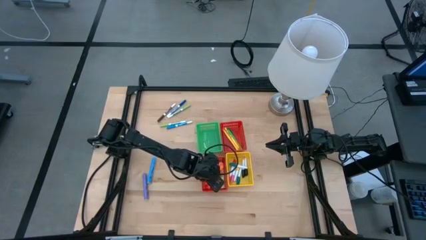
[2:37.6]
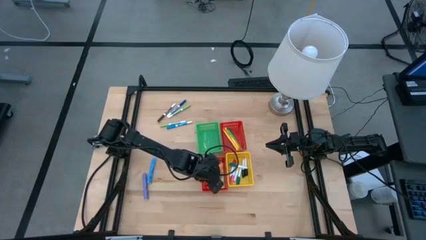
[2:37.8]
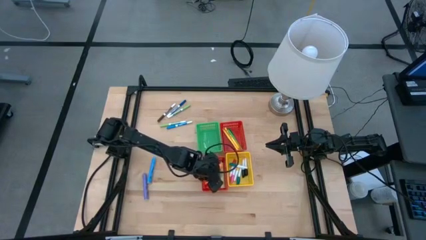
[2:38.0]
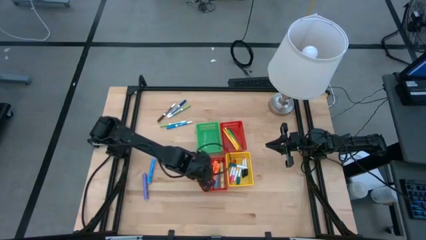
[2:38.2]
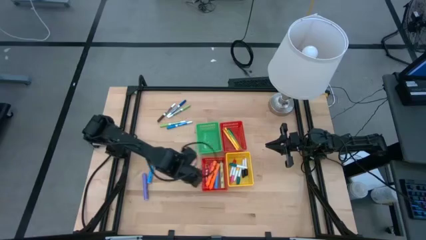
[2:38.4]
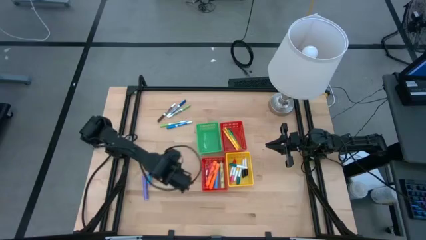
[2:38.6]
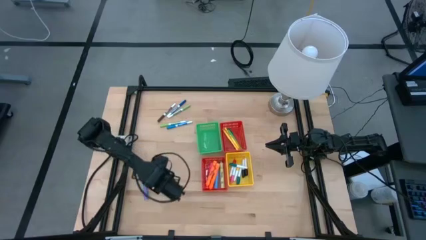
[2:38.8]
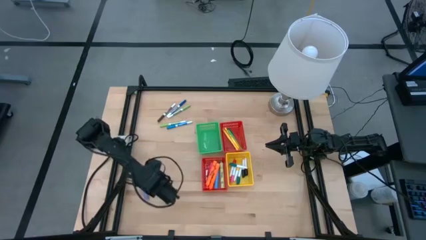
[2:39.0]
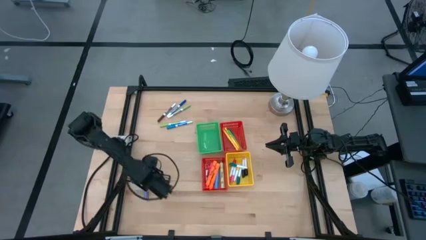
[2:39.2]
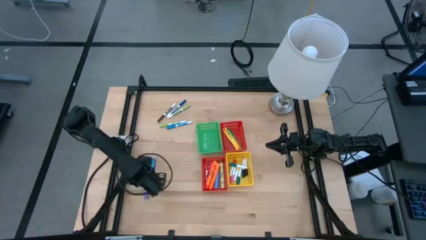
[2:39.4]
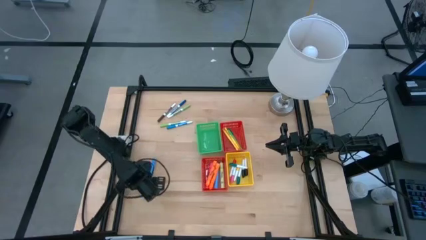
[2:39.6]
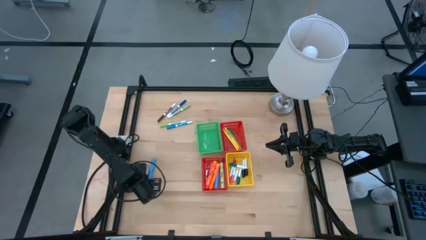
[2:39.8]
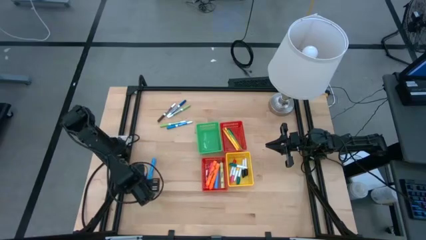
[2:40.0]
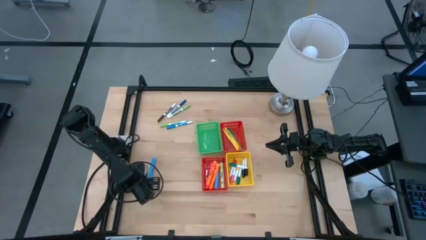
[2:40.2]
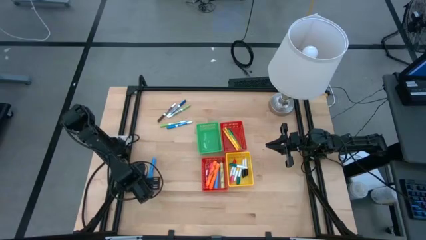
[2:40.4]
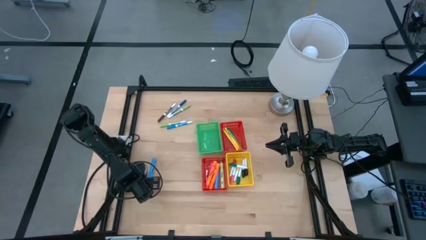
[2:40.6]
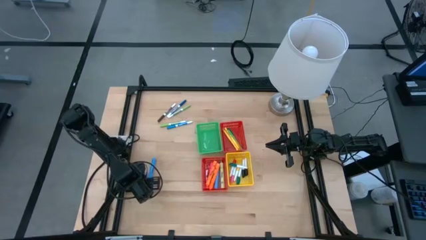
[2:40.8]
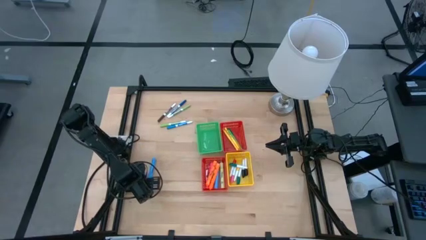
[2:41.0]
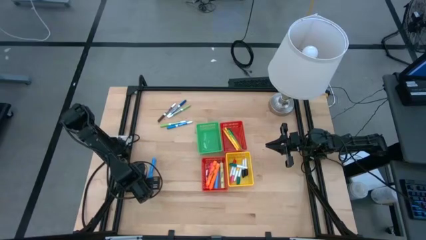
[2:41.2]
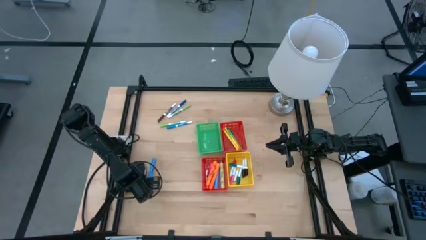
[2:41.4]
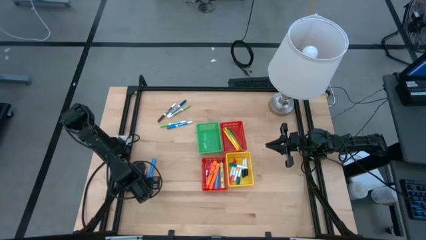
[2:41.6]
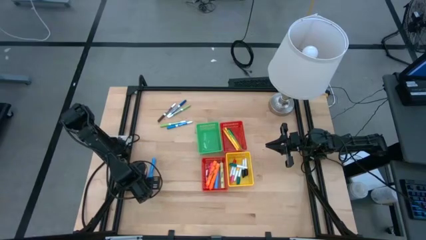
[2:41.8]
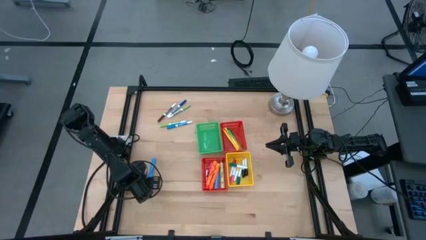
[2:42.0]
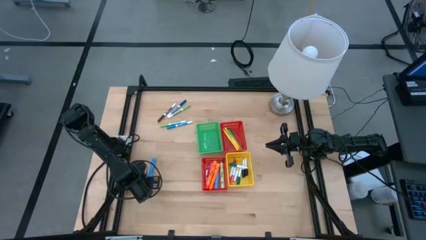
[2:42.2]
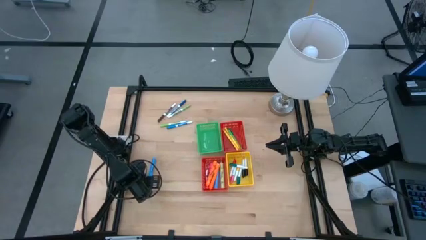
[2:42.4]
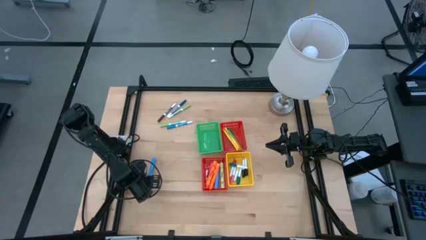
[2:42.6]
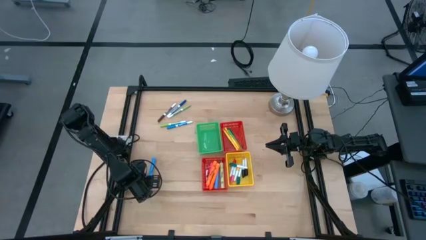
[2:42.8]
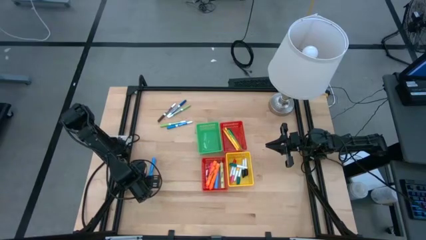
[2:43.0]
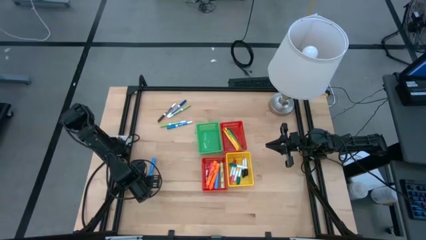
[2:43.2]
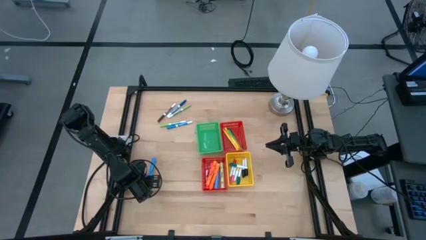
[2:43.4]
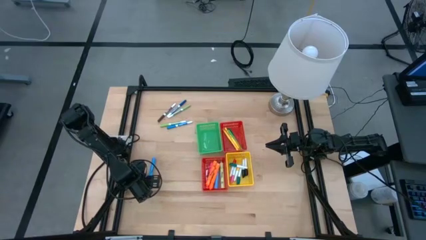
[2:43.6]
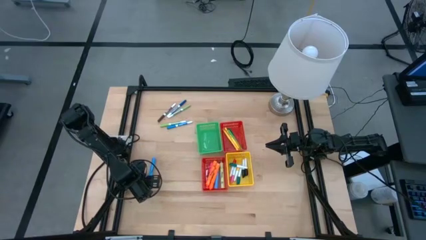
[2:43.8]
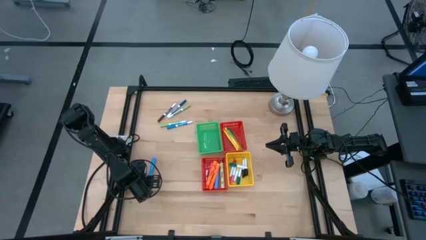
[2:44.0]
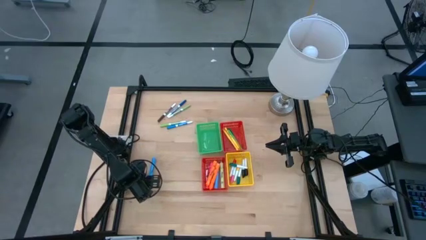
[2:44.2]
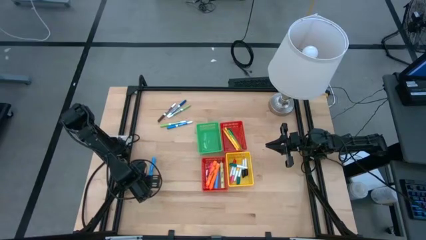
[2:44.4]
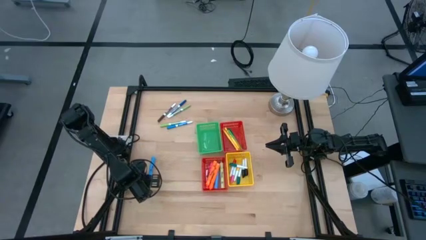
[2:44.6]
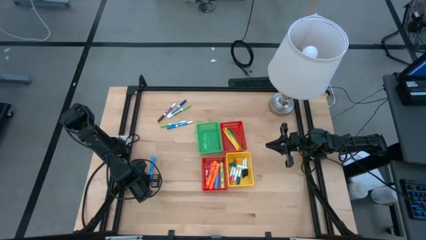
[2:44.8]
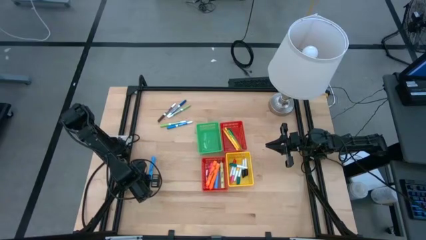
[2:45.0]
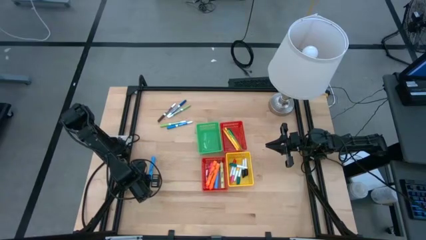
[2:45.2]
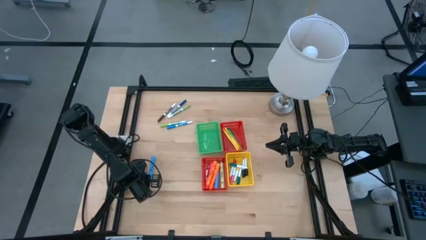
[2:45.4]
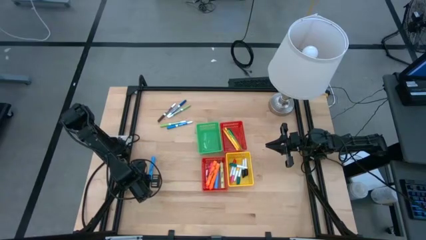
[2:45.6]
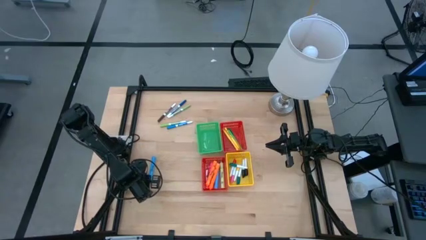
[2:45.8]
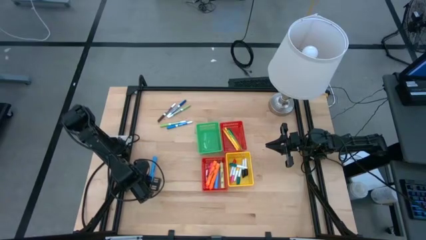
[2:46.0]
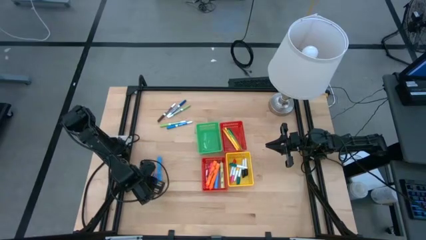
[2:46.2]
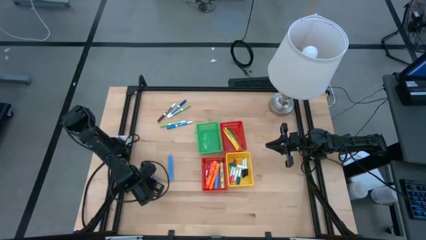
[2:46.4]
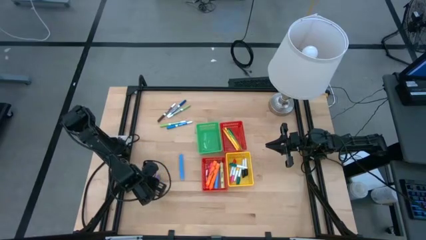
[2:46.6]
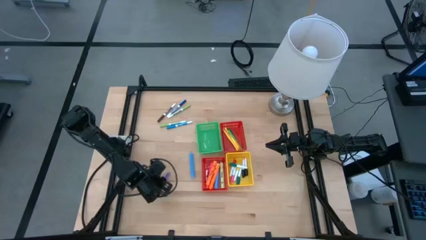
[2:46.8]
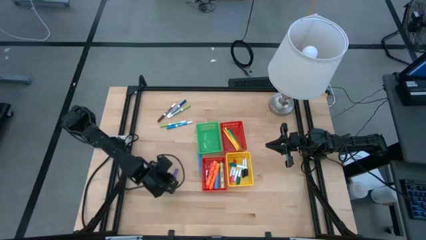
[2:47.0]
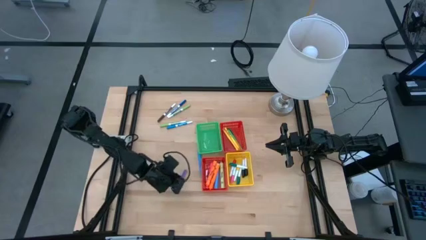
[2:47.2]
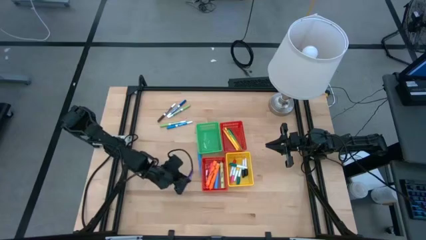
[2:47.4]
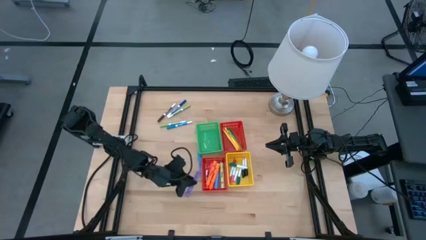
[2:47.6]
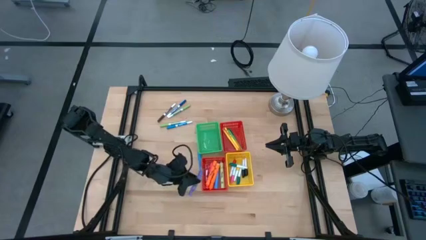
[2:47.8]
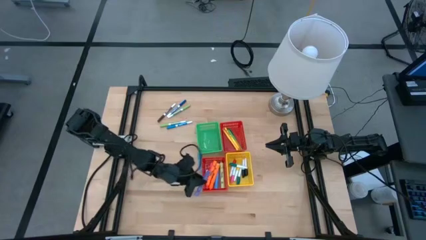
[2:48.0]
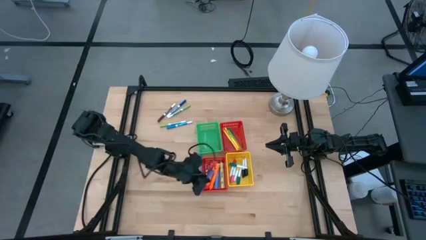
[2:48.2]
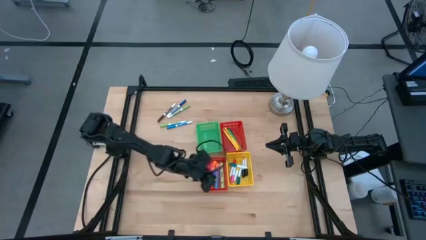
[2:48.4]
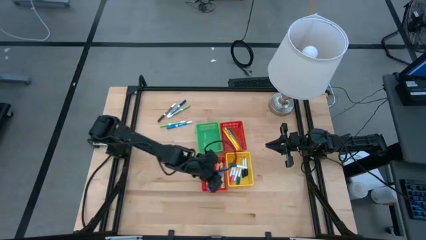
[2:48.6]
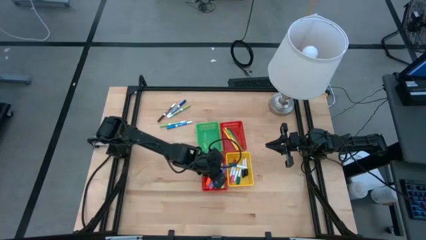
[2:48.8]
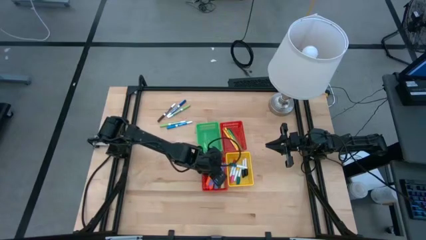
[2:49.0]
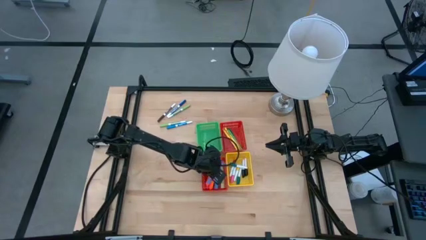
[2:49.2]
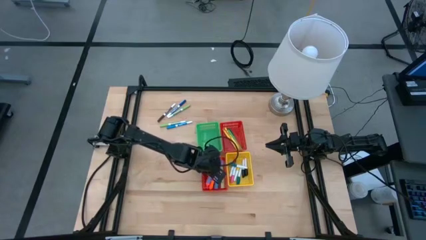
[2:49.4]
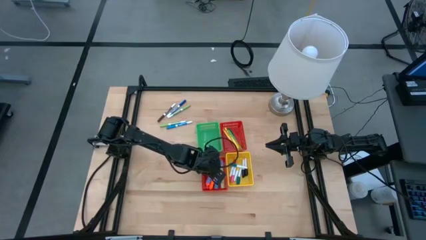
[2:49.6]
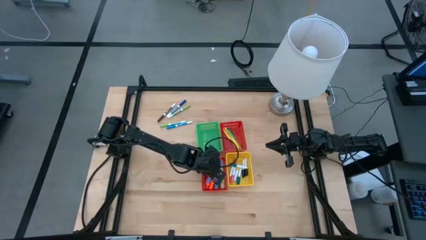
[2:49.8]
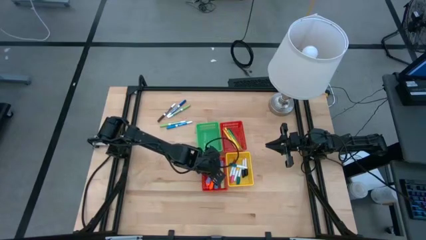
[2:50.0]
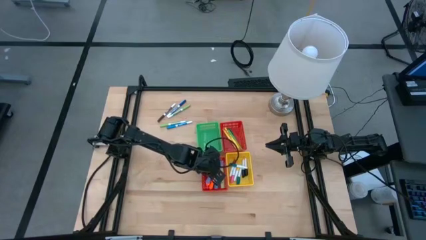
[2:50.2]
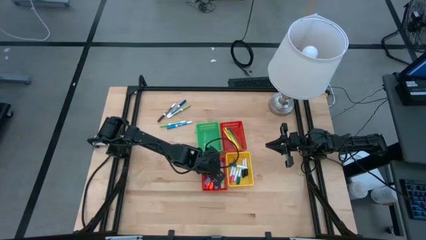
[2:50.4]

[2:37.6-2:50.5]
Task: Pick & Place Markers
Put the large purple highlighter into the bottom red bin
